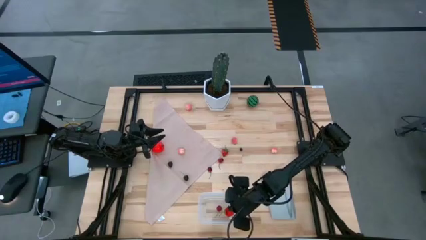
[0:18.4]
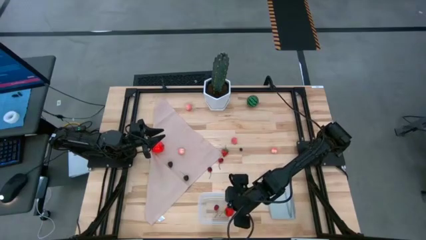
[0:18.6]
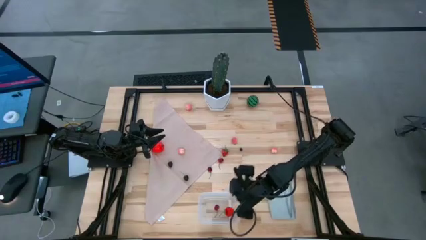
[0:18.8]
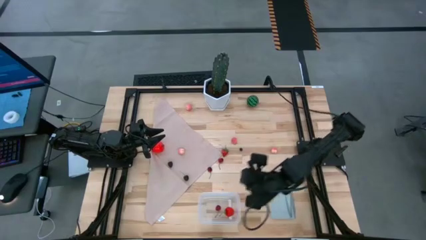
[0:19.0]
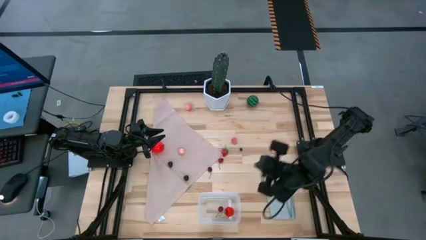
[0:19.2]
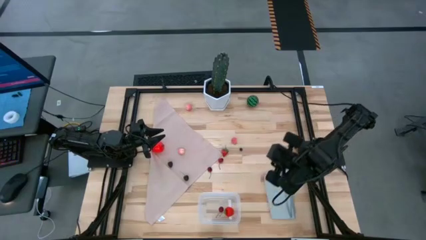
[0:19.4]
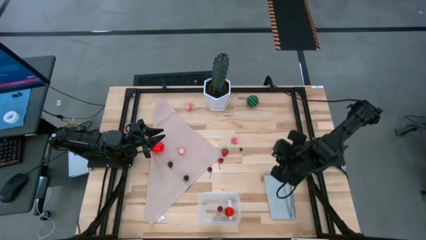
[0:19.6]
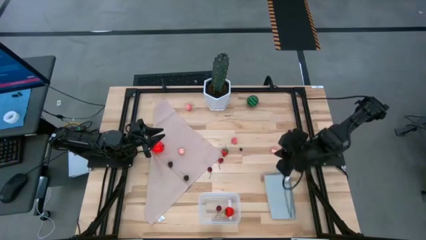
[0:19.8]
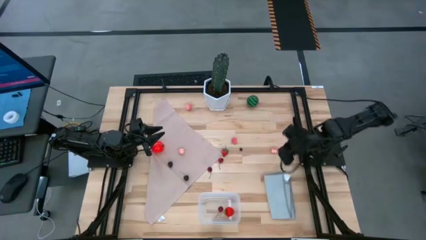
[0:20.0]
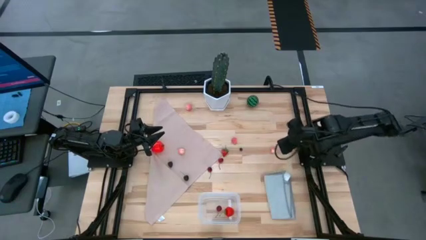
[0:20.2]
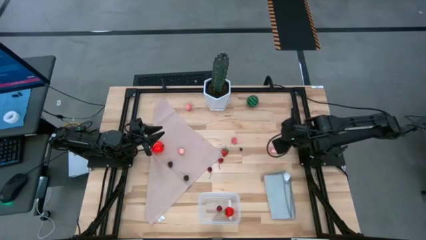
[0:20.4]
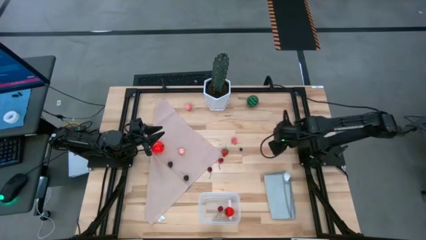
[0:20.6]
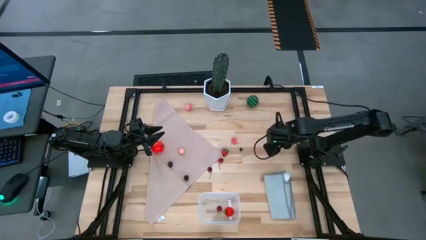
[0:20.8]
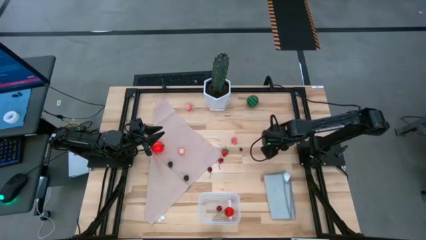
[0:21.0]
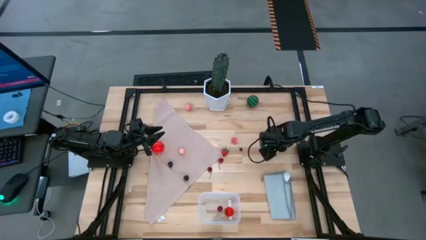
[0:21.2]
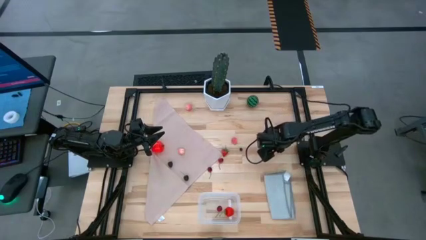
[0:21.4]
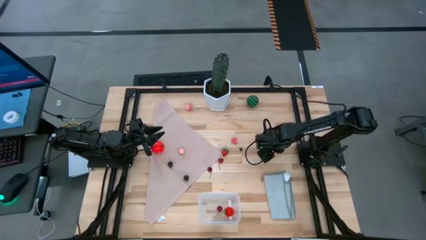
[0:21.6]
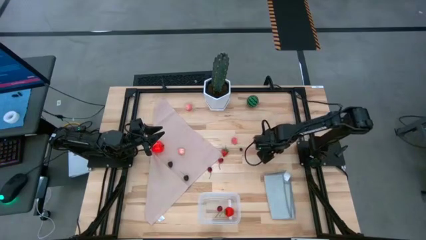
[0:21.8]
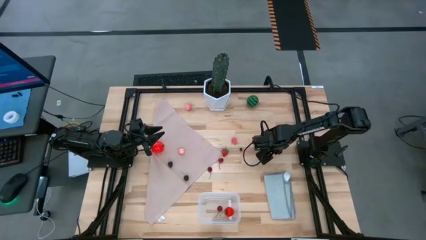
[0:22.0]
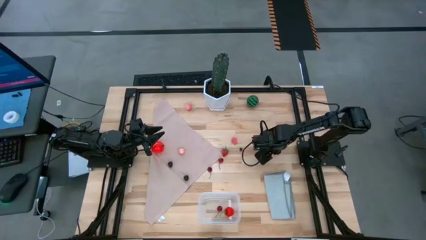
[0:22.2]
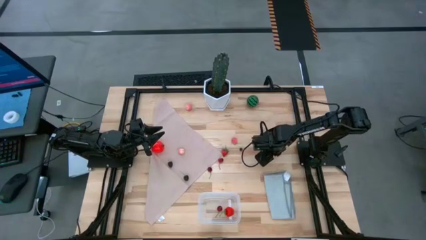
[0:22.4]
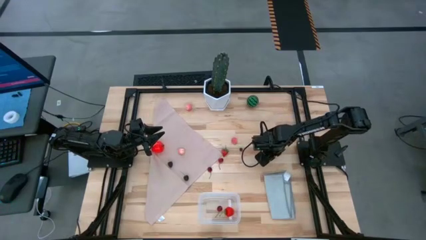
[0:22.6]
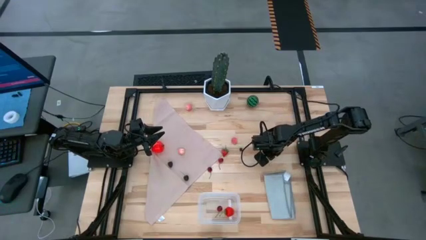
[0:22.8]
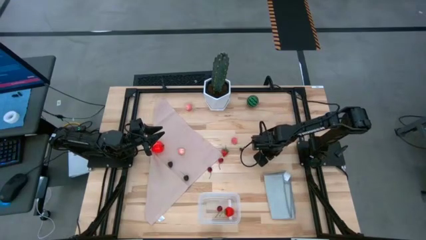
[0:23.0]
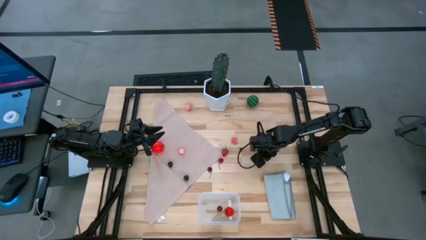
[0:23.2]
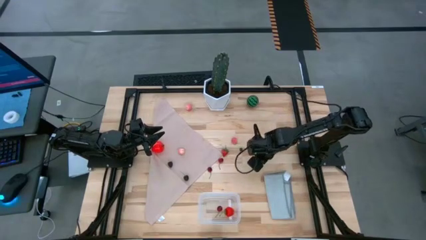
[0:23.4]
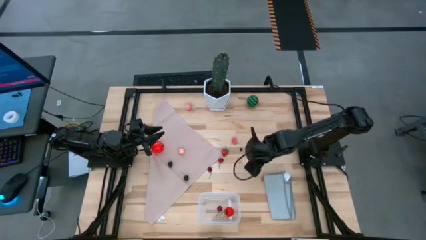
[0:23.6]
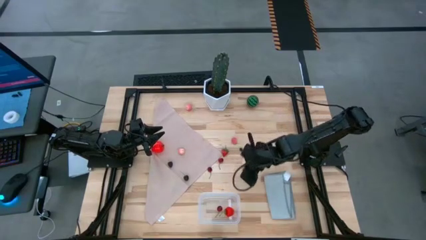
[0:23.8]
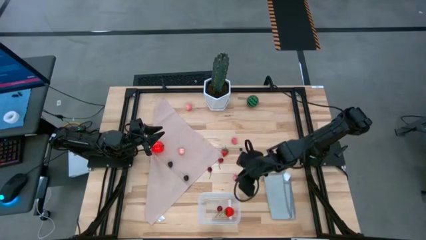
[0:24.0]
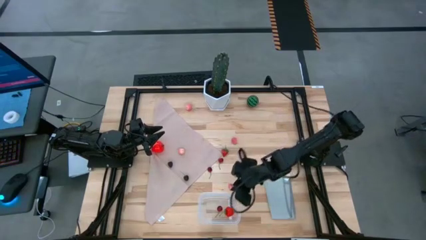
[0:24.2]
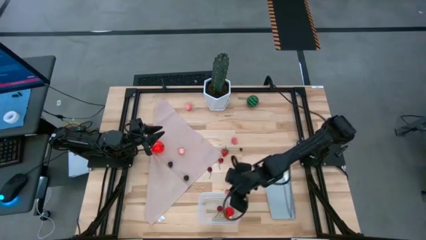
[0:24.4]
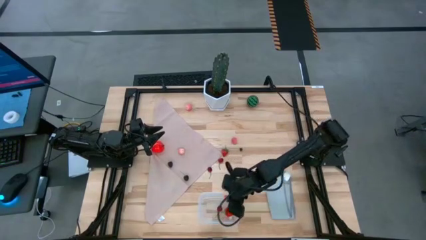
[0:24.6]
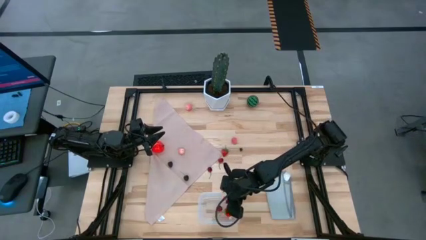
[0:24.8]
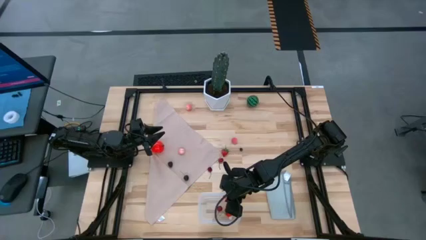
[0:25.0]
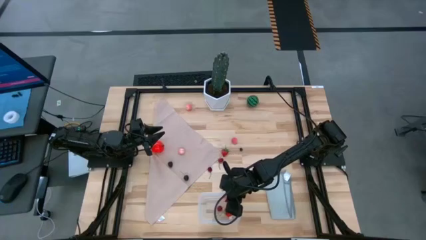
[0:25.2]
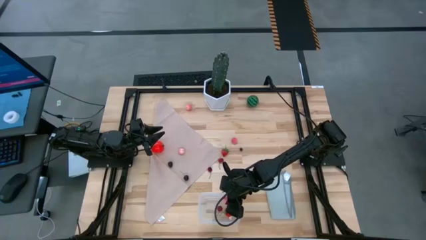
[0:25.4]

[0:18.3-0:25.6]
Task: Pick and placing Produce into tupperware
Put the bottom right peach into the transparent bin

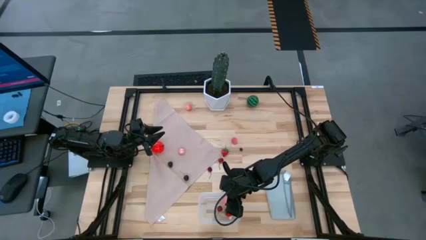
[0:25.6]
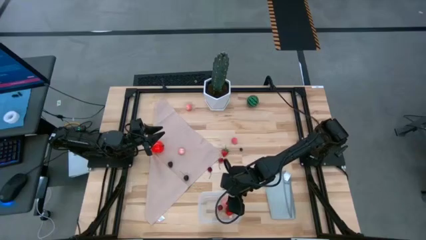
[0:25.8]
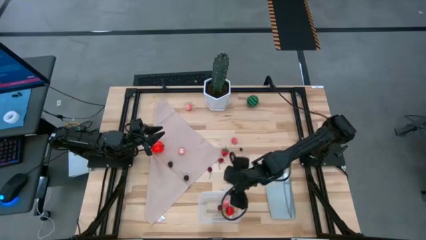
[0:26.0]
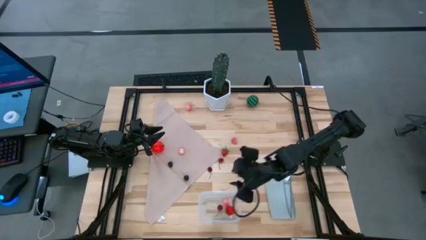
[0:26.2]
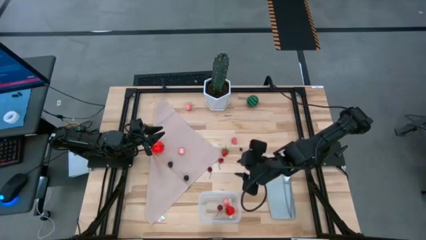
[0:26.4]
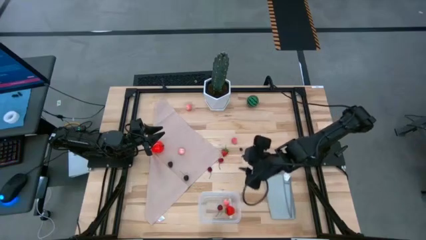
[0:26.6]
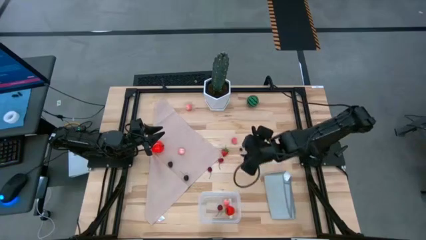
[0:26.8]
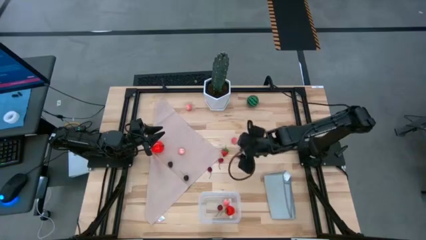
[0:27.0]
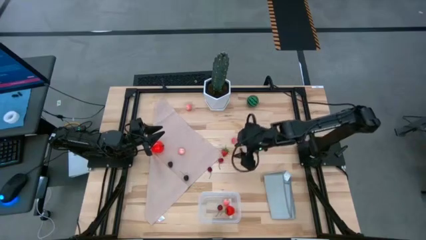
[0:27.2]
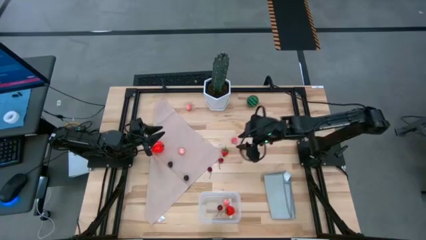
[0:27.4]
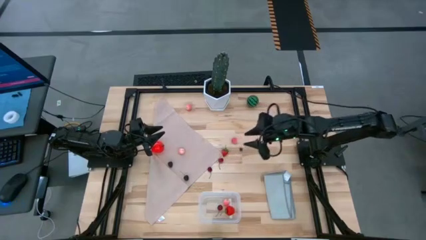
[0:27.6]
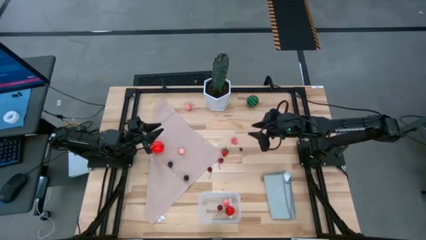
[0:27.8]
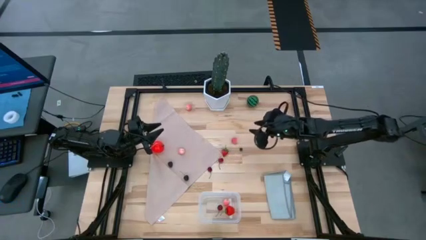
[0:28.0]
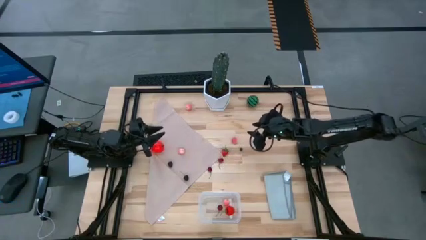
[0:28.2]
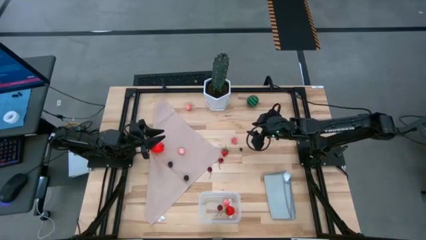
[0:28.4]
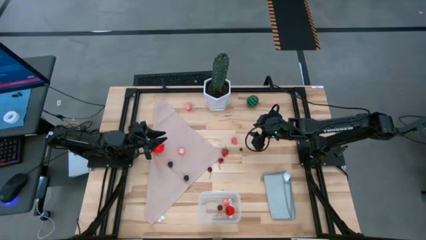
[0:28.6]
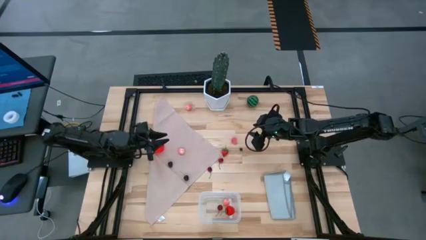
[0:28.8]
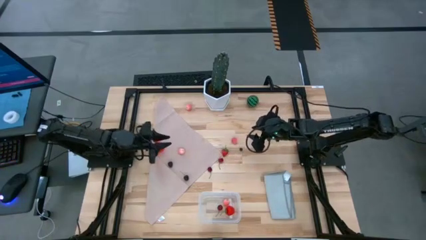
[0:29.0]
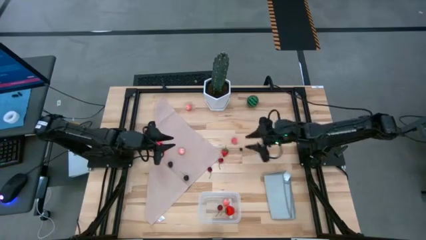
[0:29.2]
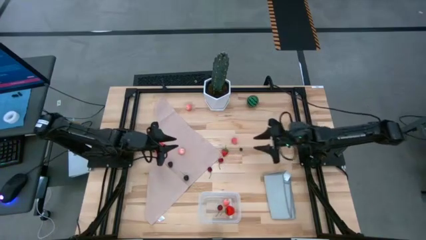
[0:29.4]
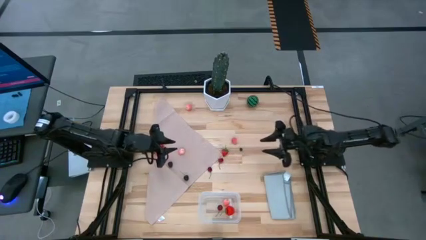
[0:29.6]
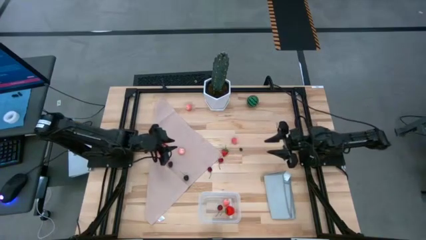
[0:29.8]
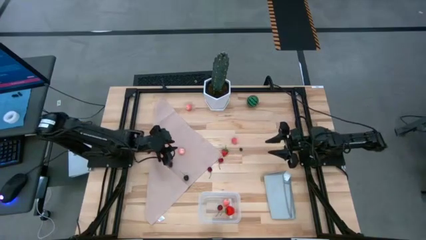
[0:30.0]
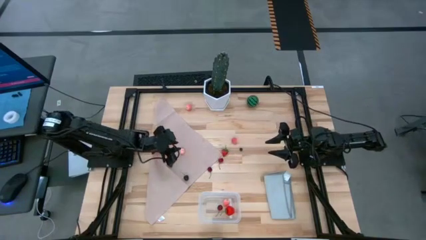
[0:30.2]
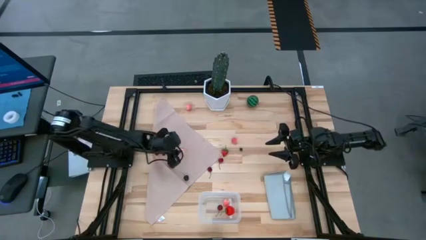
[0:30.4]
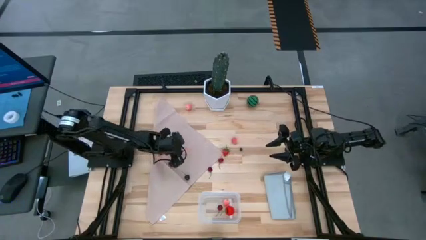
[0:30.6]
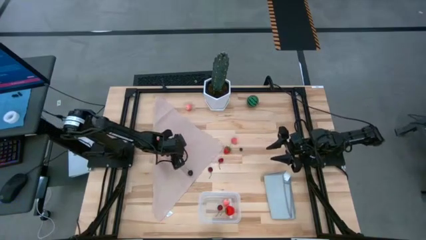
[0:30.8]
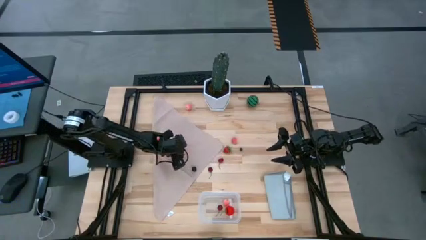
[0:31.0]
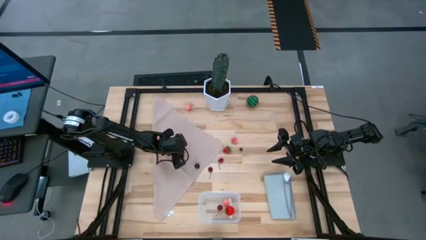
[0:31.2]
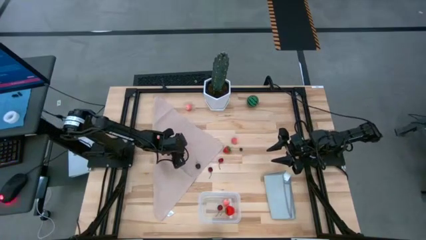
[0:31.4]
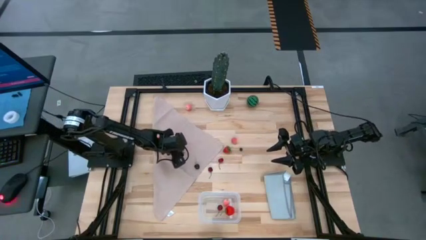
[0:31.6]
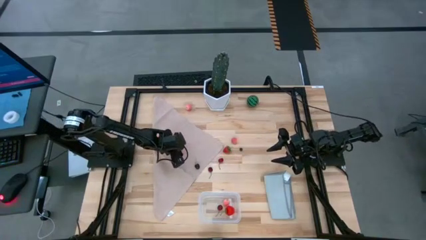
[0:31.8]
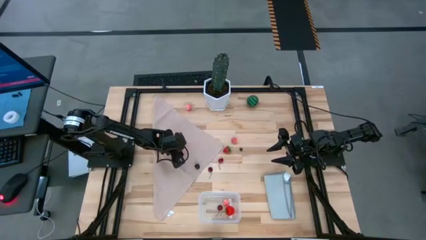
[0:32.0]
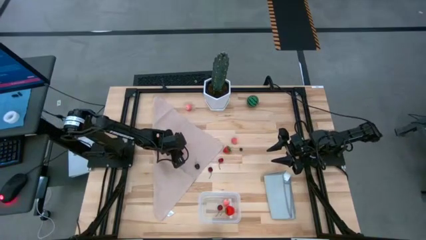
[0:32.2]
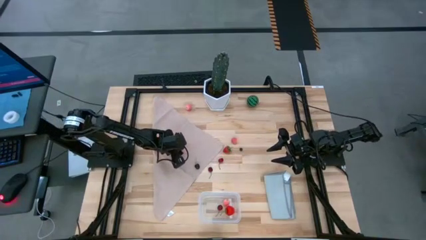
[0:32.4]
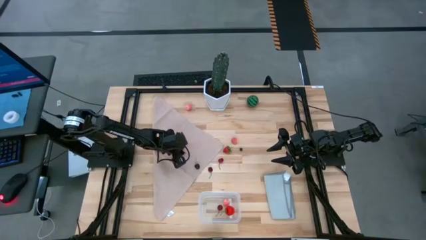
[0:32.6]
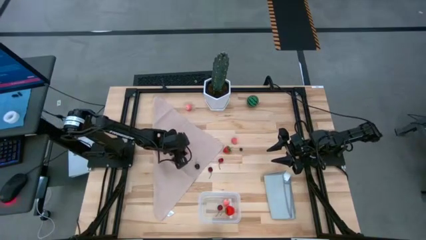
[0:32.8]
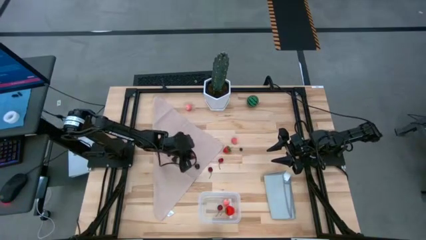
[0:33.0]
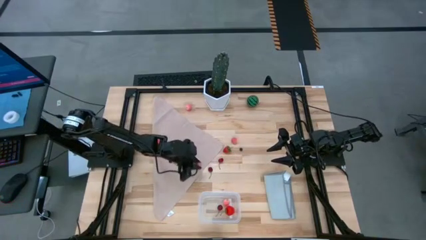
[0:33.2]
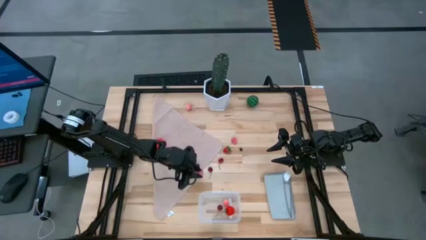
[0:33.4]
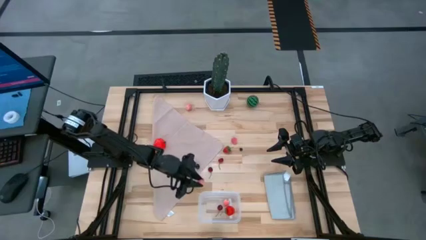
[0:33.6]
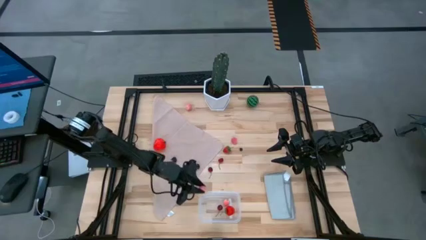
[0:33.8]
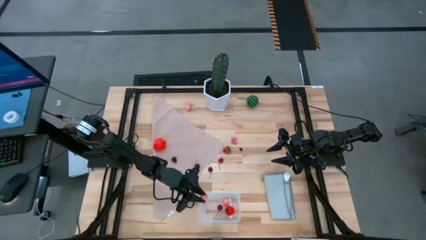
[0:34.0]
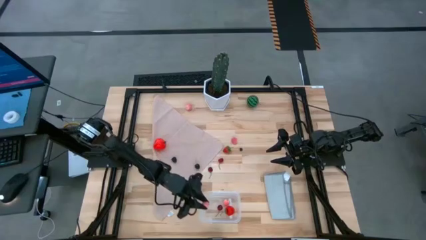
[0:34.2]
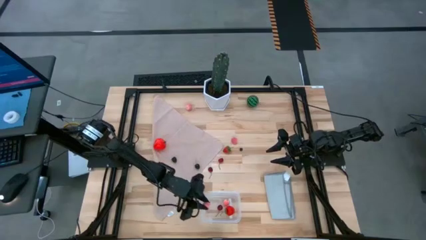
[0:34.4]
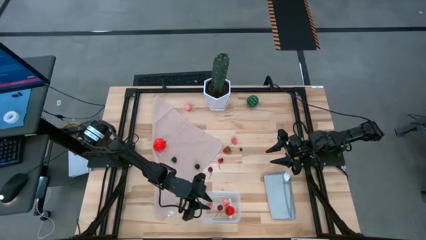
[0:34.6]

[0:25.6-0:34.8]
Put the bottom left peach into the transparent bin
